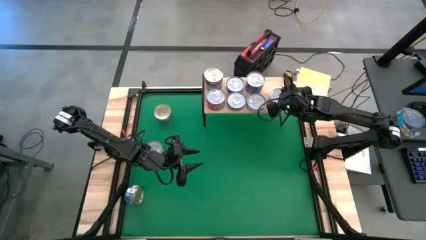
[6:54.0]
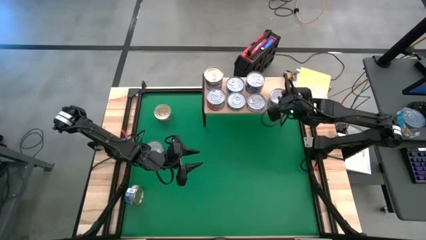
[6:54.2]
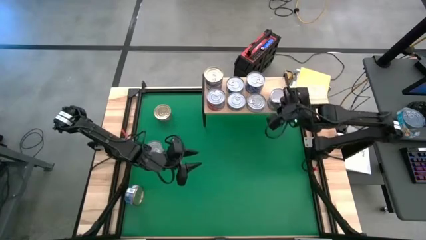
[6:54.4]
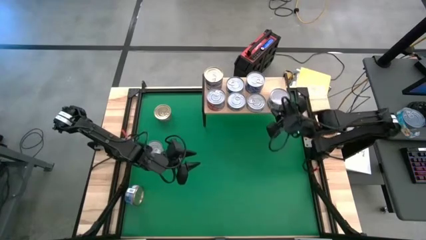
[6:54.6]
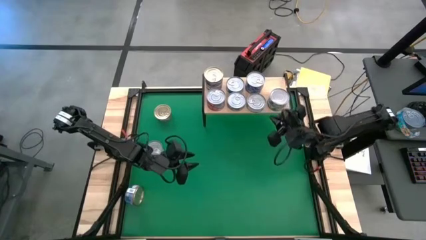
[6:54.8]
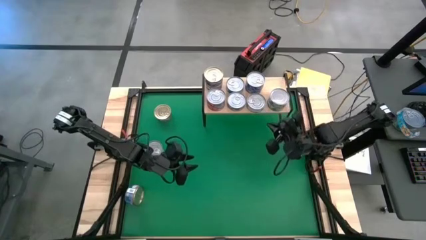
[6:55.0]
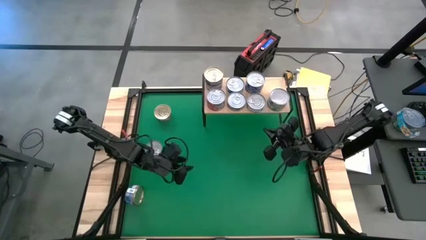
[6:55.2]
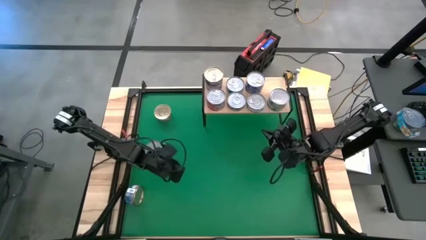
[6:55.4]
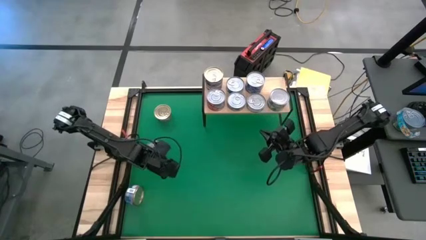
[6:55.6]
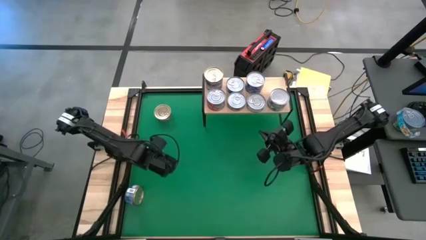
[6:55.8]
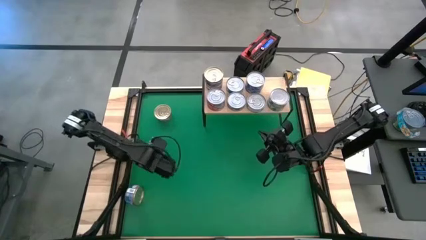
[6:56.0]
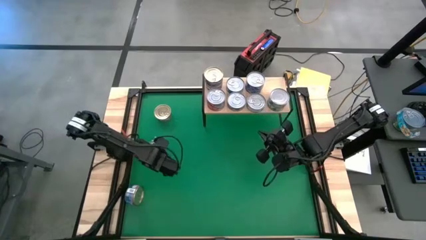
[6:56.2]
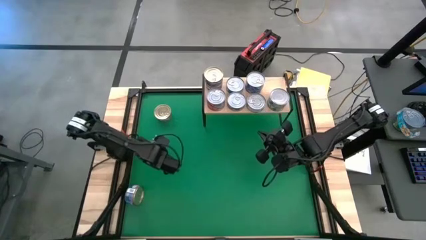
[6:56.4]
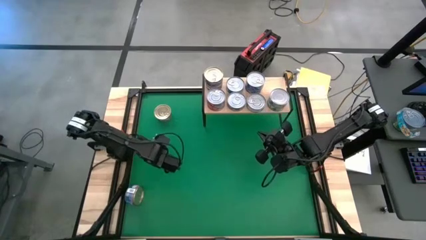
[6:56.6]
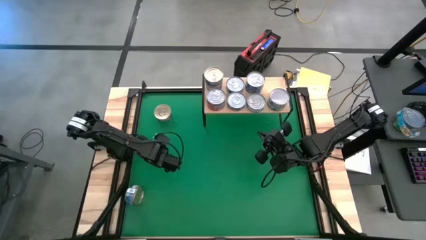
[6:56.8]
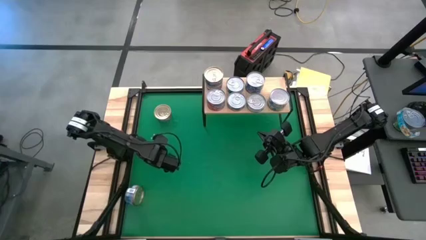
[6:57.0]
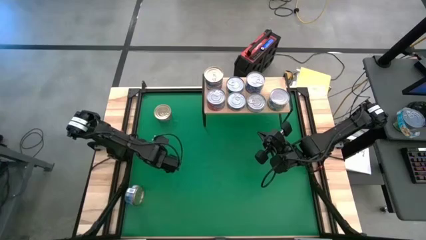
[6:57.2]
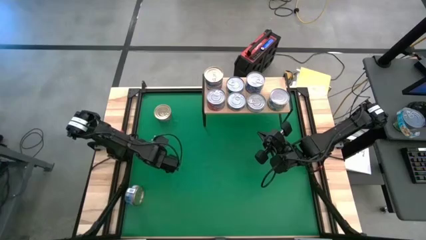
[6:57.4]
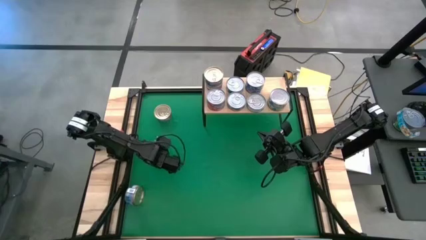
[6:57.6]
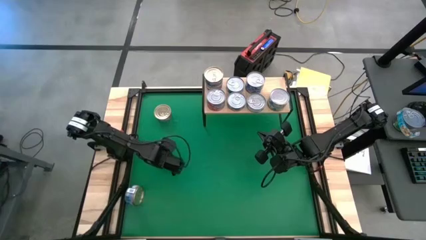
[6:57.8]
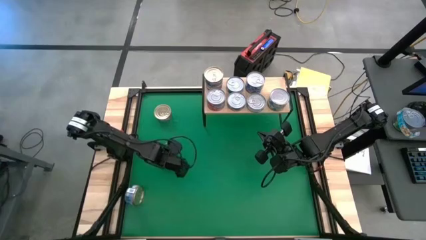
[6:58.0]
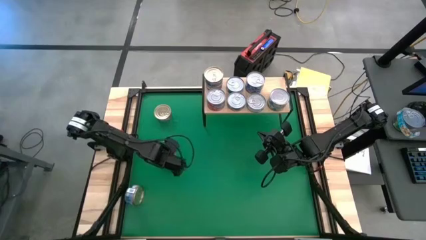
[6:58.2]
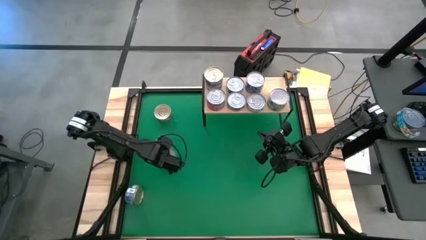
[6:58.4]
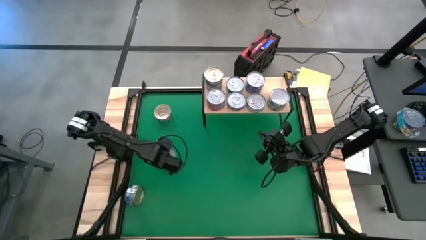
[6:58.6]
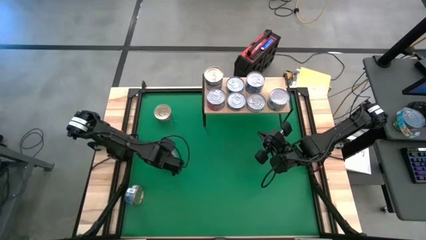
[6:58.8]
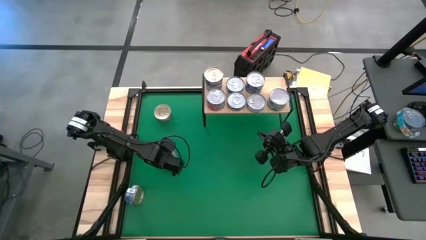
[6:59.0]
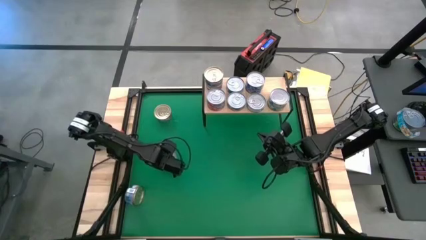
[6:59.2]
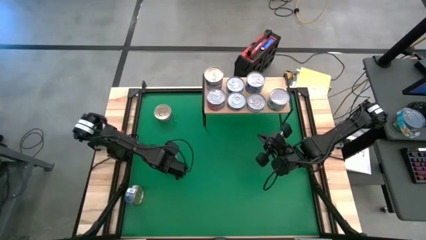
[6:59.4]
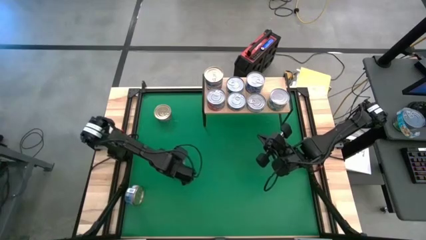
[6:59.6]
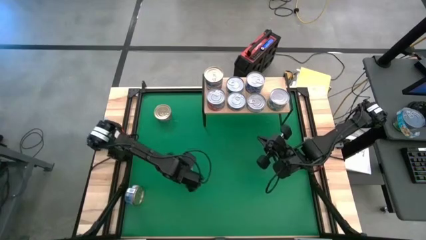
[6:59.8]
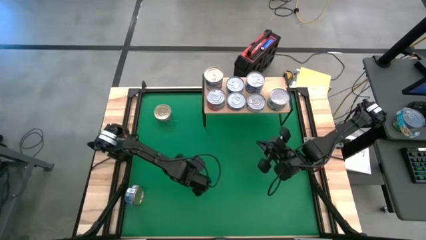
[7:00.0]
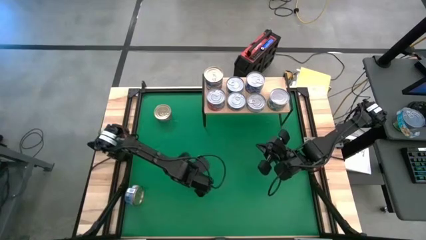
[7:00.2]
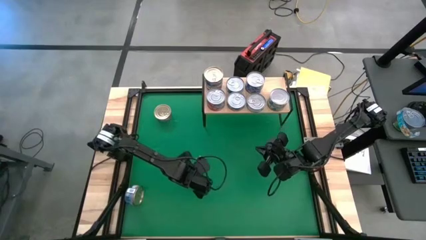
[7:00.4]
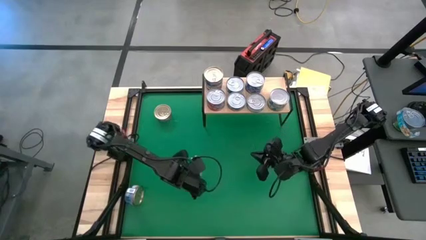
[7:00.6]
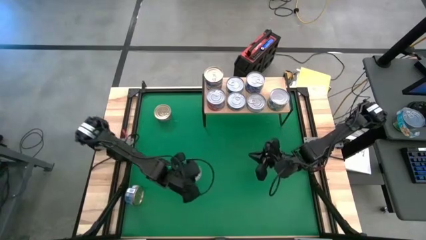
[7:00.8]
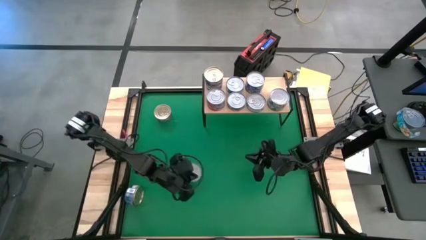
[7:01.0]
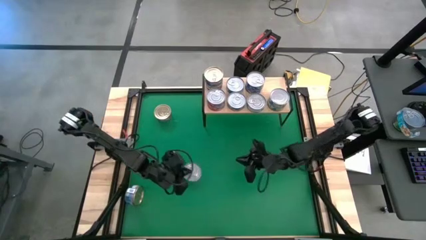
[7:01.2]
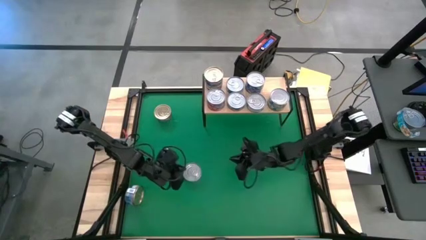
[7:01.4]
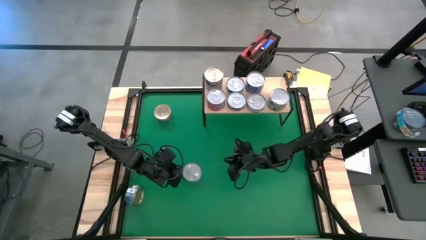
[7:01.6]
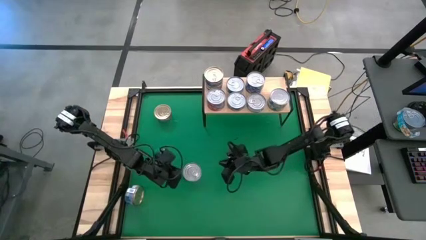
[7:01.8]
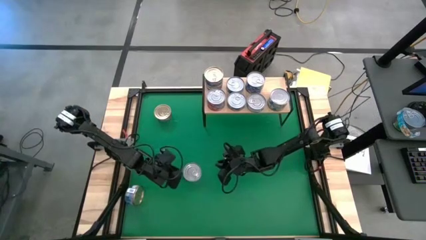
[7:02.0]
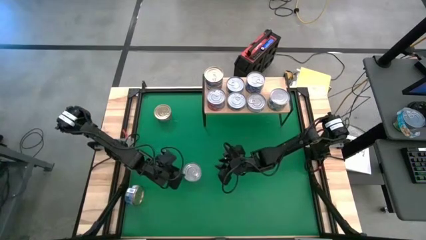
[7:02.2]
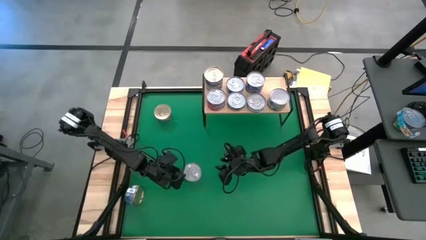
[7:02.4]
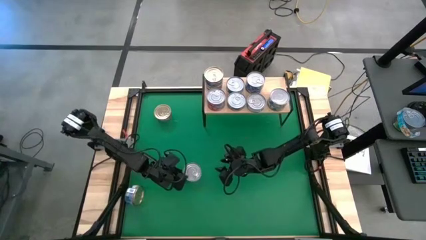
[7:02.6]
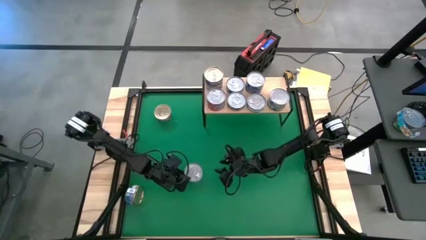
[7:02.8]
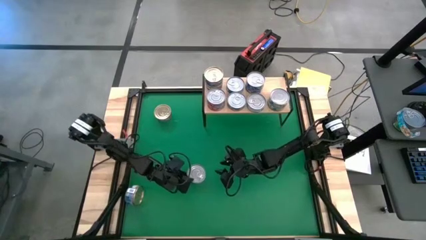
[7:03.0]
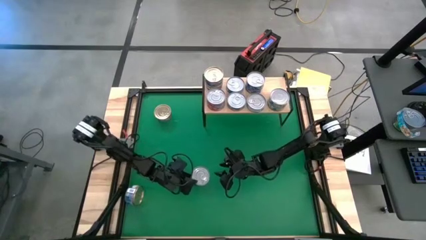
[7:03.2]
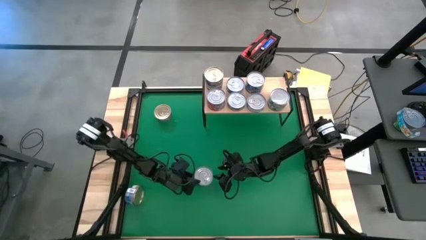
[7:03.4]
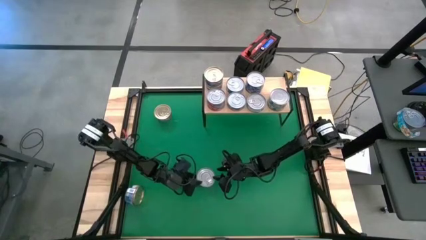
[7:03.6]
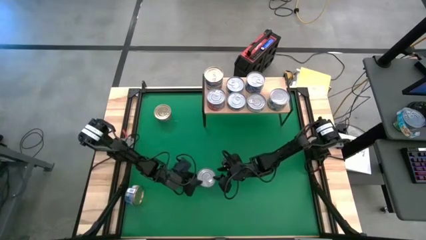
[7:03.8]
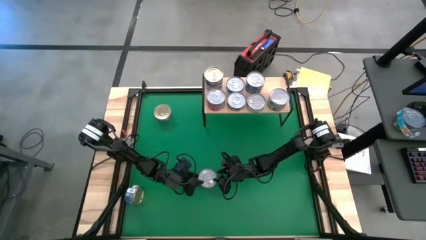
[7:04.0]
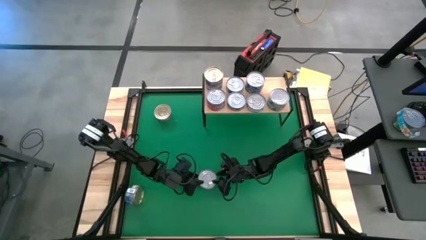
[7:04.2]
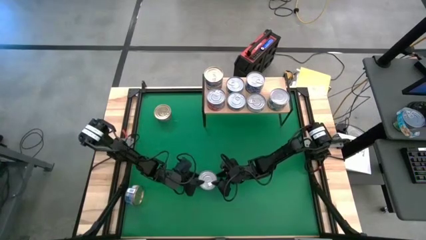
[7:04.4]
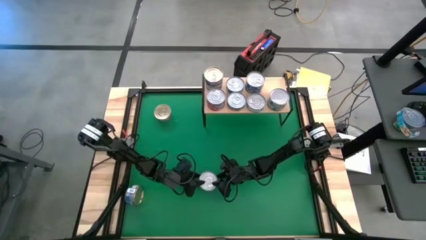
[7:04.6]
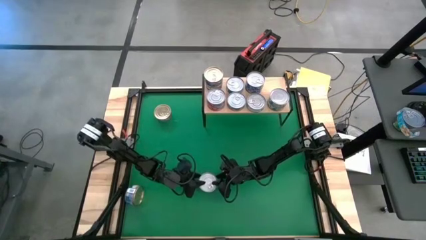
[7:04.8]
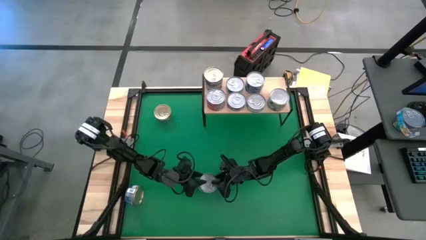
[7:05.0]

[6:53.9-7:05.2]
Task: Stack canned seafood by type on shelf
Stack the green/blue tuna can on top of the other green/blue tuna can on the shelf
